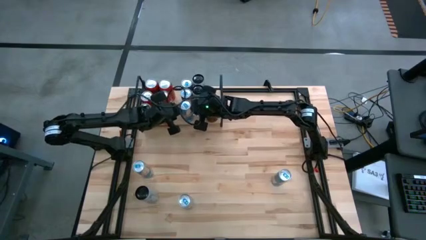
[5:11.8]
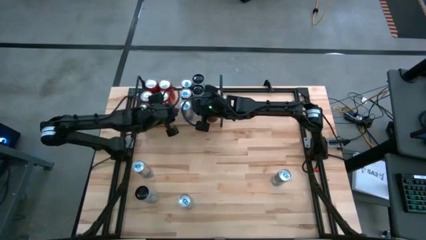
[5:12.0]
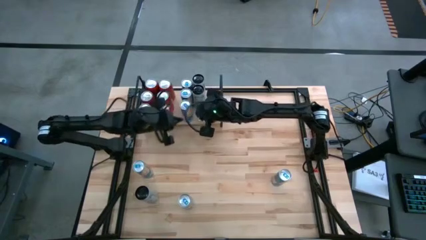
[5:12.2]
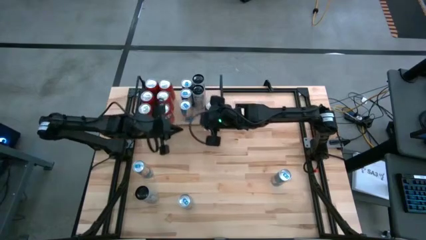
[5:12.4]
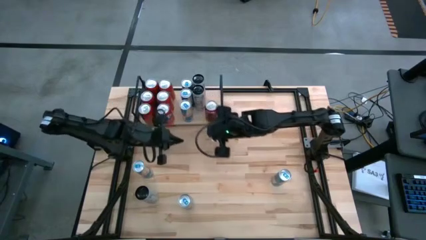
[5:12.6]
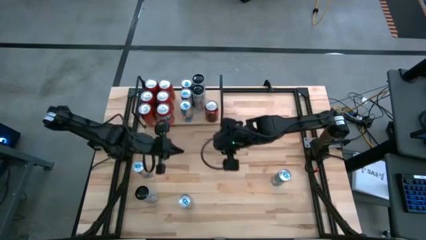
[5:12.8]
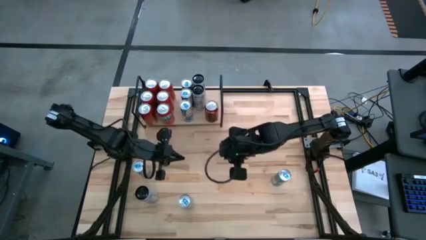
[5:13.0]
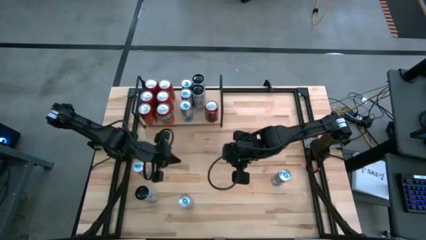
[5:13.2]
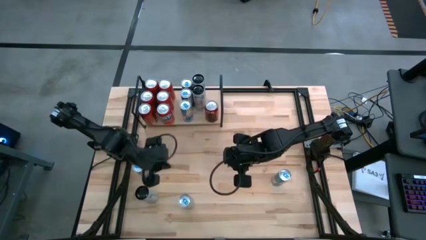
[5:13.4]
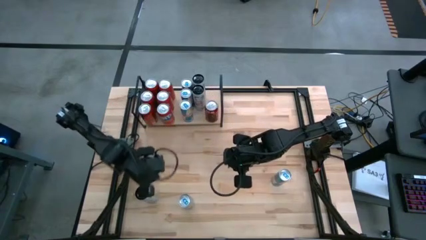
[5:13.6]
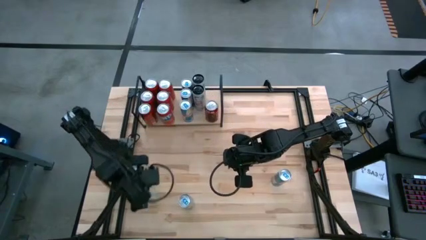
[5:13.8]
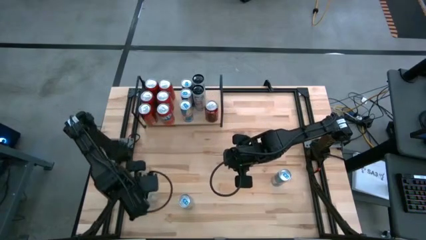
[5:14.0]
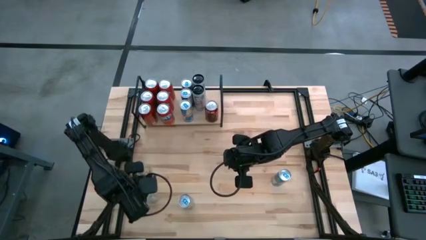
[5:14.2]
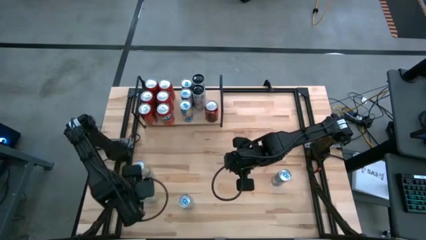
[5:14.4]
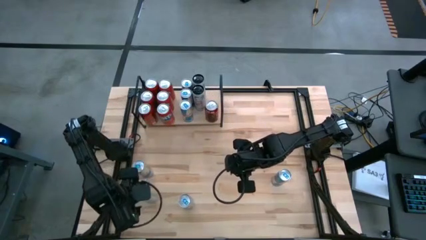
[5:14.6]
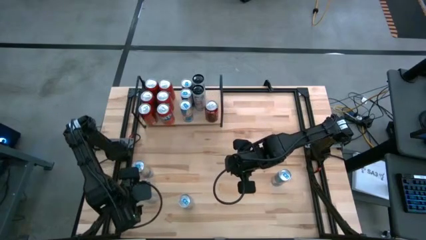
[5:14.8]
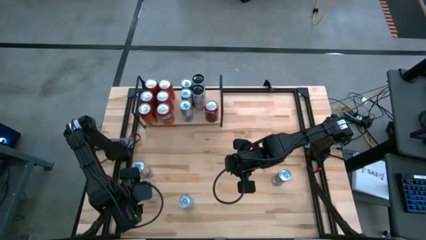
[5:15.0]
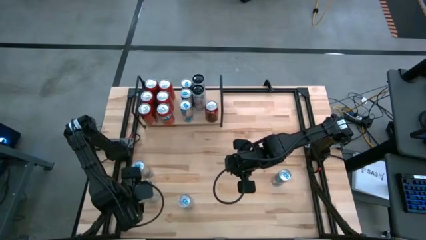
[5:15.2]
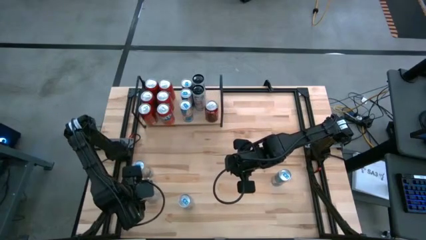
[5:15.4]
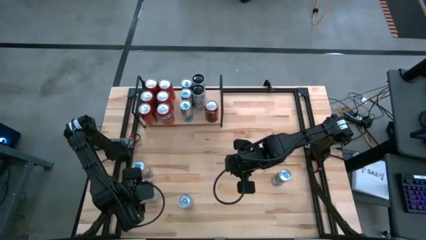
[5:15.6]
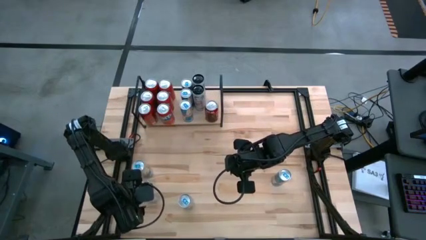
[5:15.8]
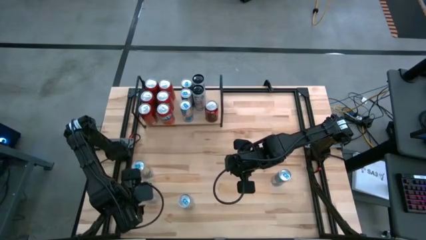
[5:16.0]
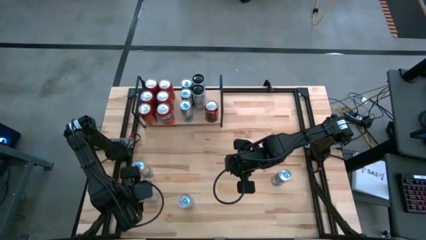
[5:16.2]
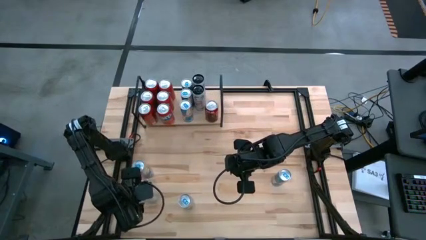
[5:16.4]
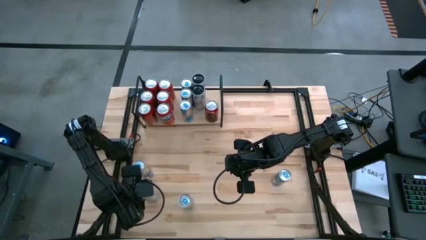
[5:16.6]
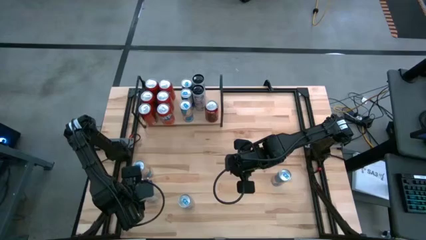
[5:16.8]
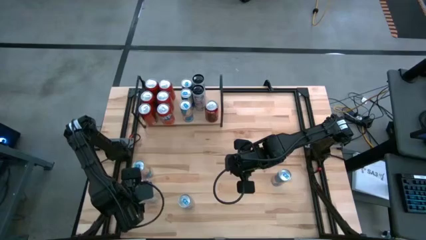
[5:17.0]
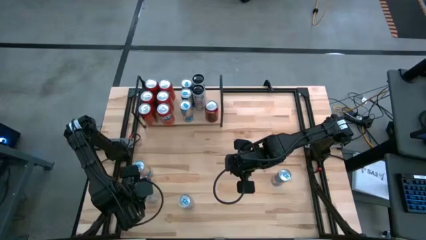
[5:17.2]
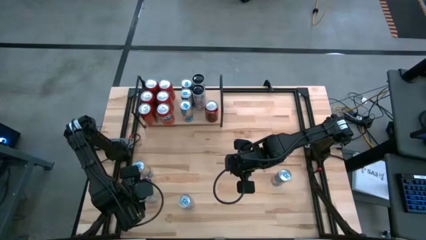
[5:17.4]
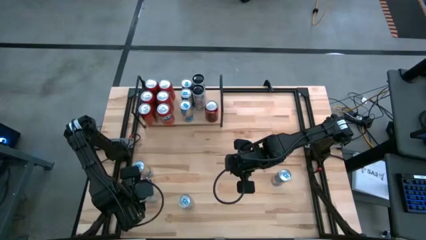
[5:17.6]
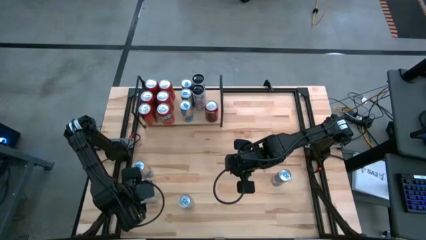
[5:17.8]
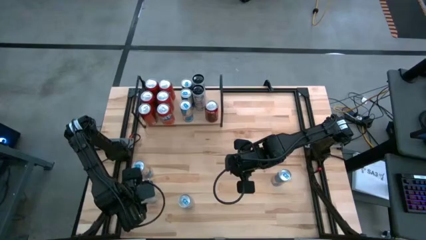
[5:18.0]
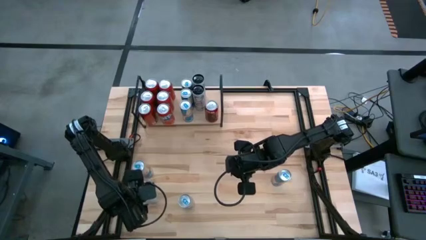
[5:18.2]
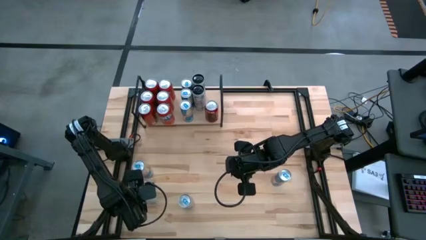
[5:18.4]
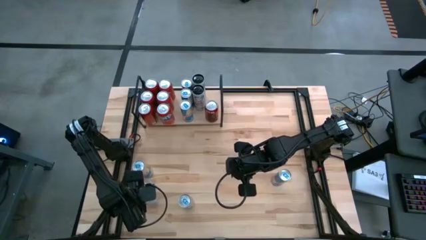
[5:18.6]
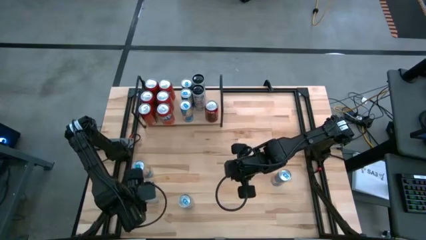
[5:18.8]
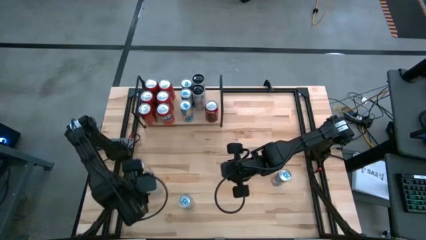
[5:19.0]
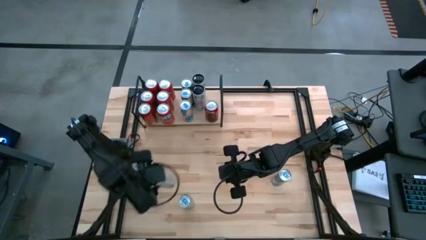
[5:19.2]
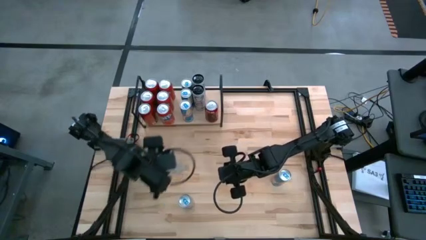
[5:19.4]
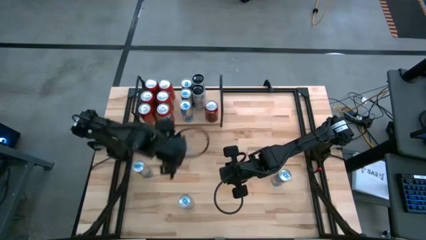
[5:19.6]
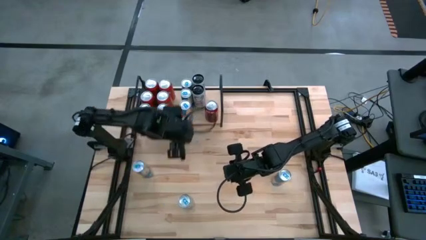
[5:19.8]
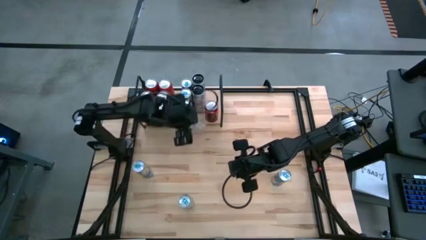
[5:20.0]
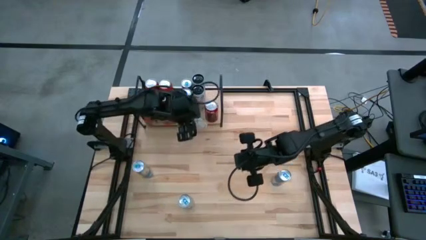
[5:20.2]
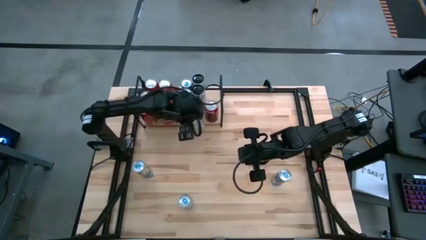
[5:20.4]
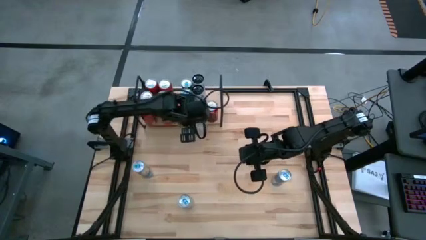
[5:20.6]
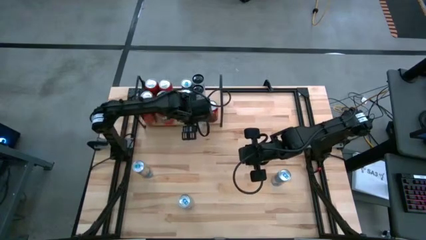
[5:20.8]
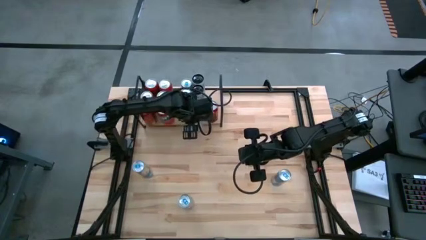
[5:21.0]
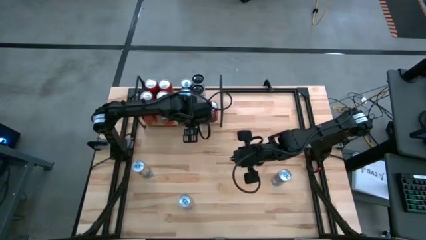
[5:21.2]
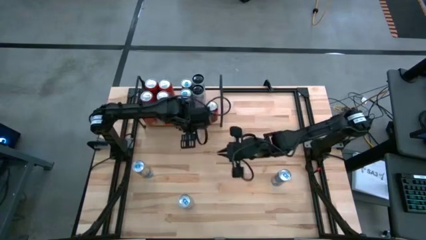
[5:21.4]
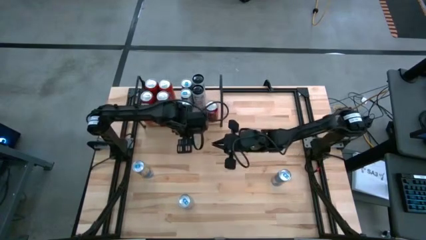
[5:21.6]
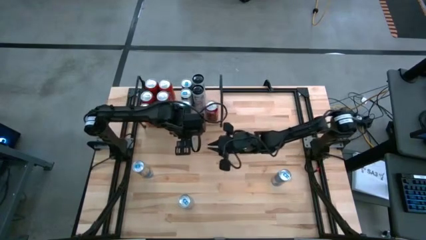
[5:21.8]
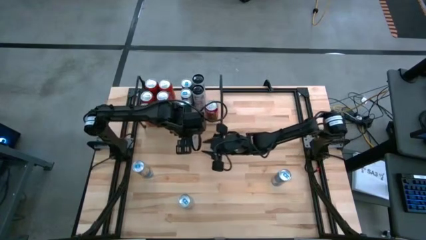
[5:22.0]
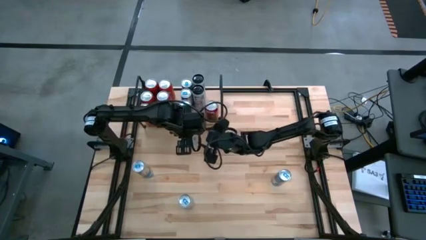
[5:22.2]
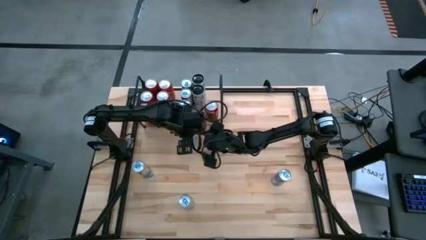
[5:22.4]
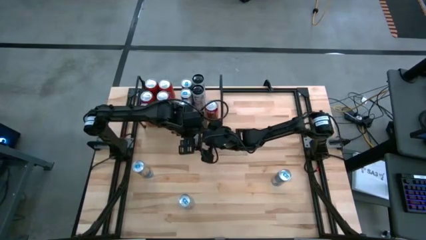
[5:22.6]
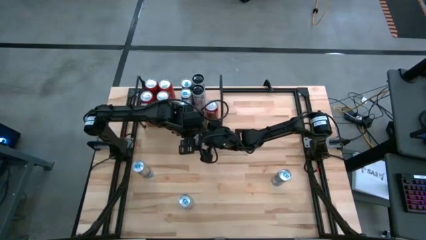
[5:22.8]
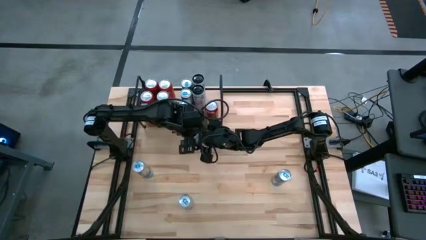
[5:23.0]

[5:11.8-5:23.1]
Task: Place canned beverage on shelf
Put the white and pink soda can on the shelf aligned with the other white and pink soda can
